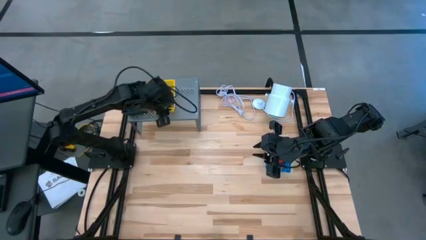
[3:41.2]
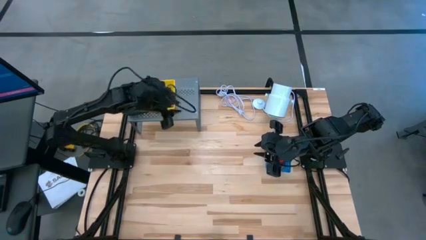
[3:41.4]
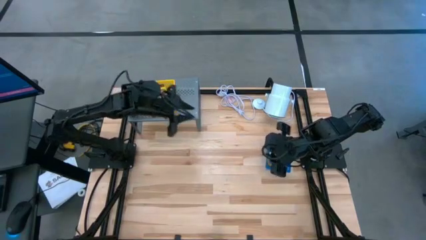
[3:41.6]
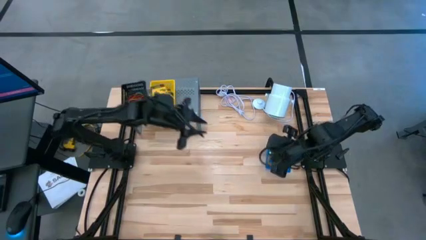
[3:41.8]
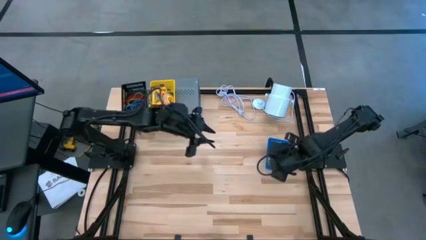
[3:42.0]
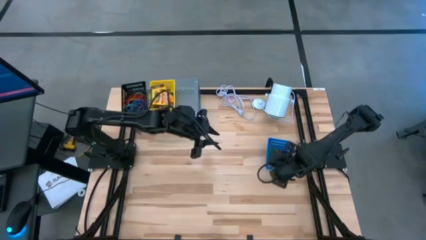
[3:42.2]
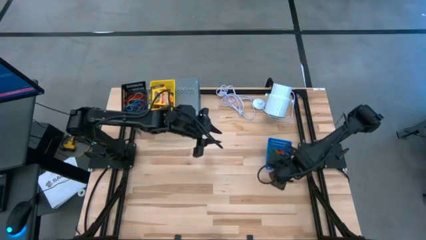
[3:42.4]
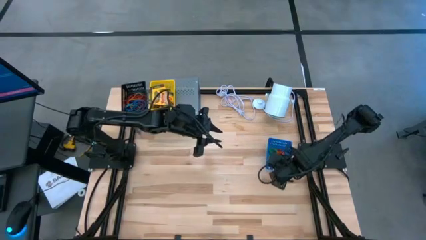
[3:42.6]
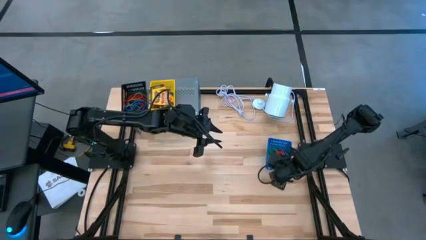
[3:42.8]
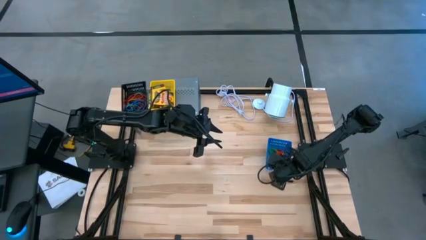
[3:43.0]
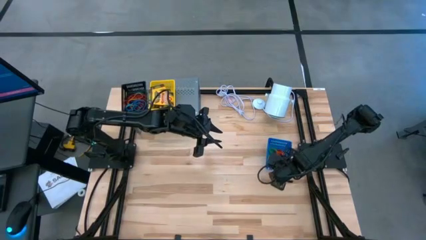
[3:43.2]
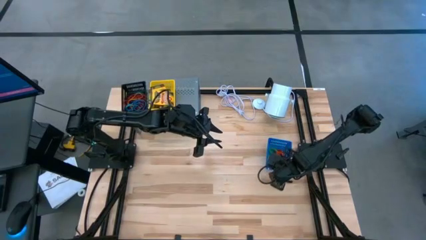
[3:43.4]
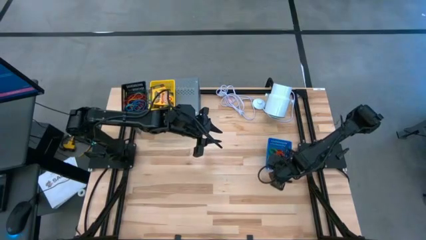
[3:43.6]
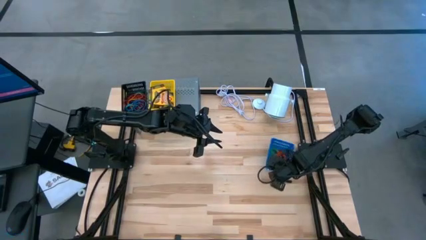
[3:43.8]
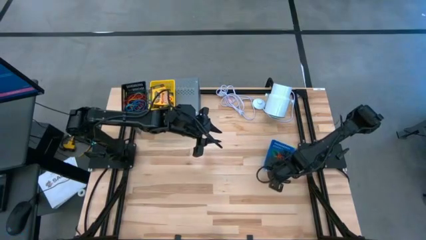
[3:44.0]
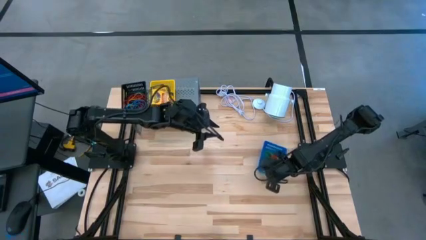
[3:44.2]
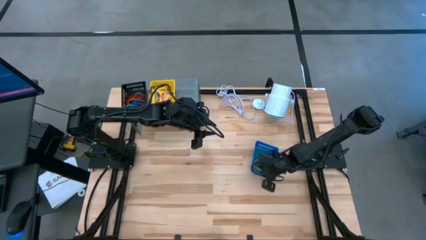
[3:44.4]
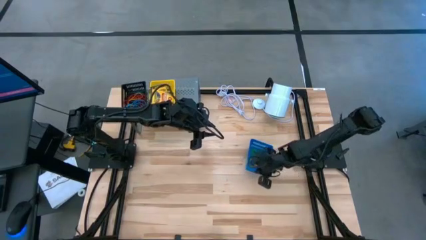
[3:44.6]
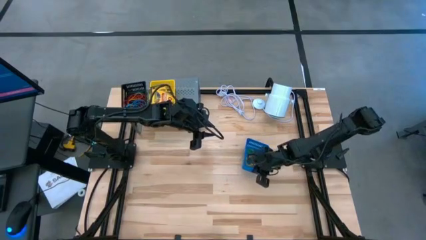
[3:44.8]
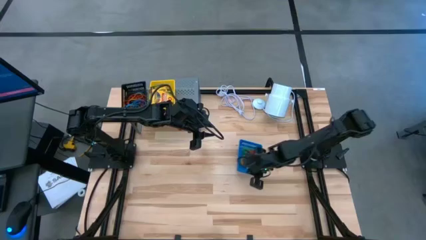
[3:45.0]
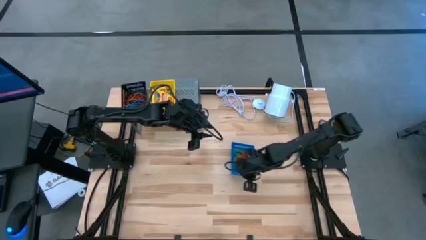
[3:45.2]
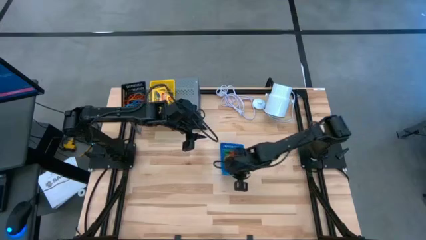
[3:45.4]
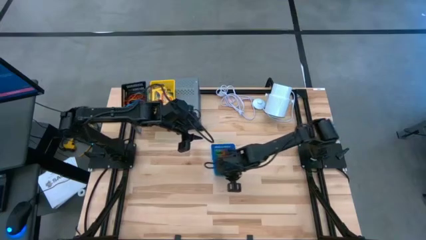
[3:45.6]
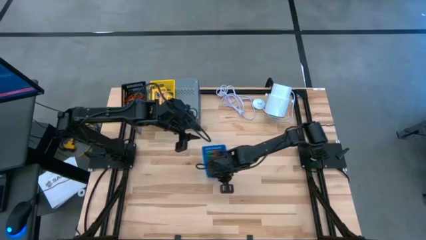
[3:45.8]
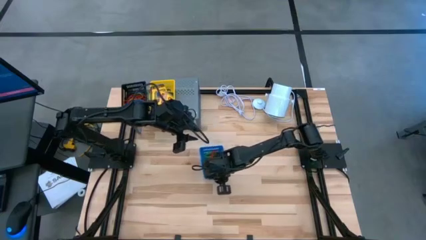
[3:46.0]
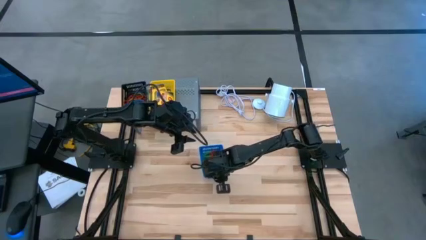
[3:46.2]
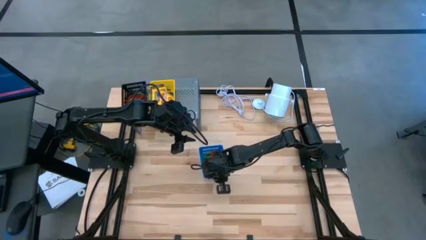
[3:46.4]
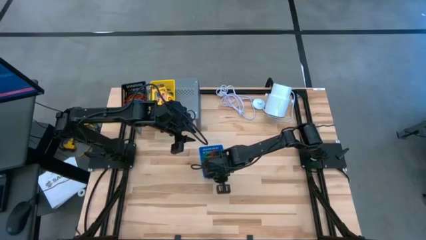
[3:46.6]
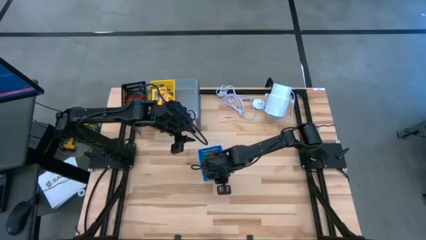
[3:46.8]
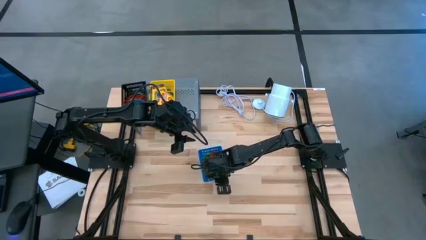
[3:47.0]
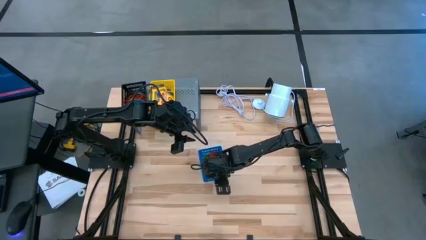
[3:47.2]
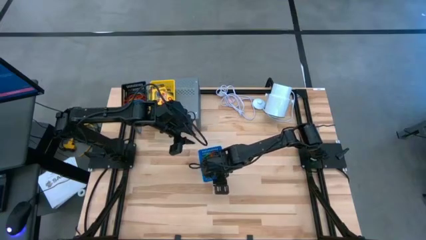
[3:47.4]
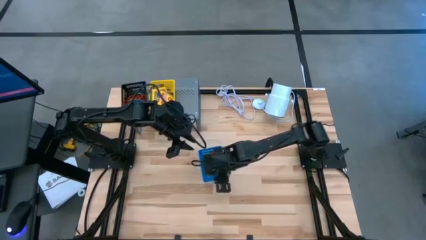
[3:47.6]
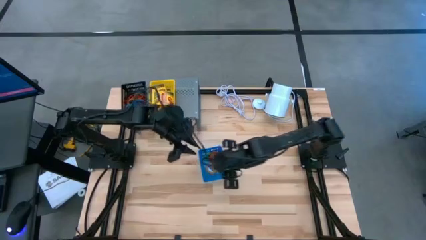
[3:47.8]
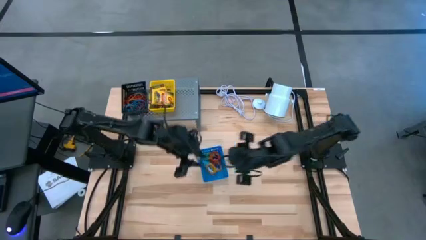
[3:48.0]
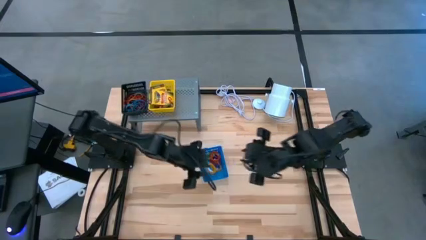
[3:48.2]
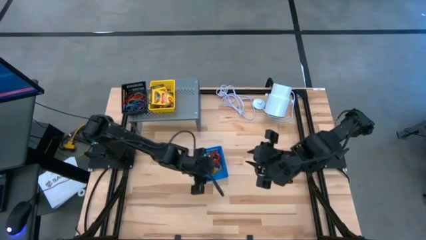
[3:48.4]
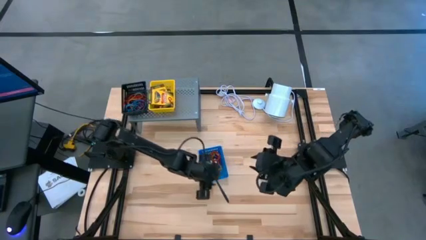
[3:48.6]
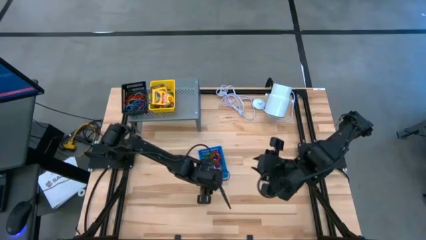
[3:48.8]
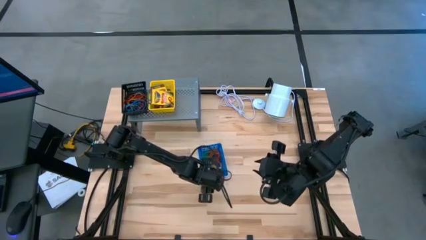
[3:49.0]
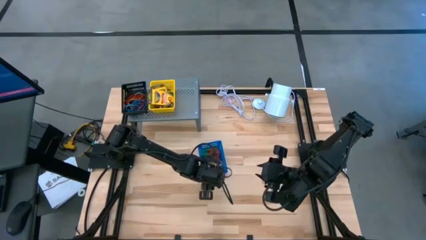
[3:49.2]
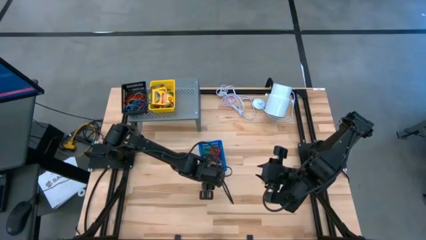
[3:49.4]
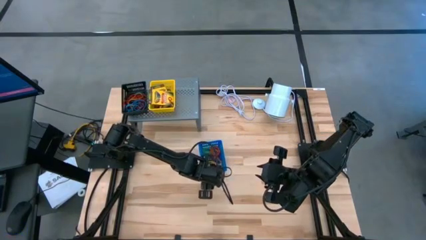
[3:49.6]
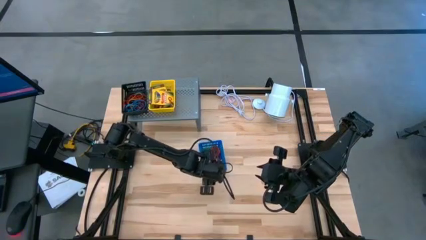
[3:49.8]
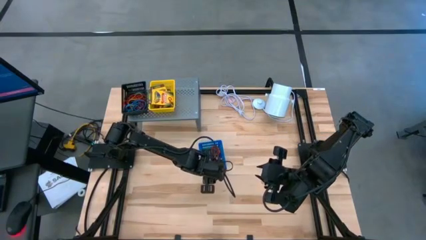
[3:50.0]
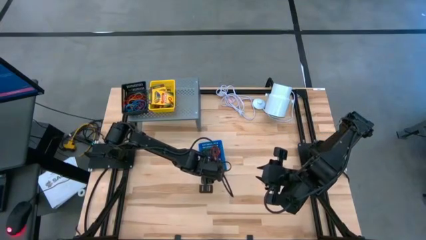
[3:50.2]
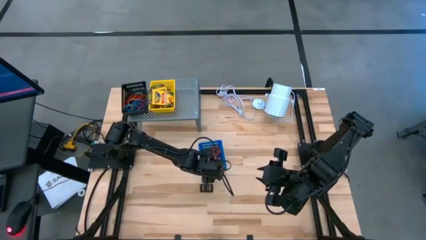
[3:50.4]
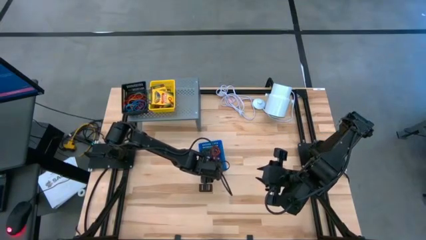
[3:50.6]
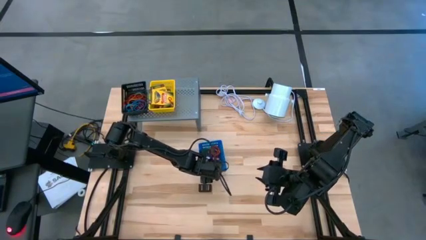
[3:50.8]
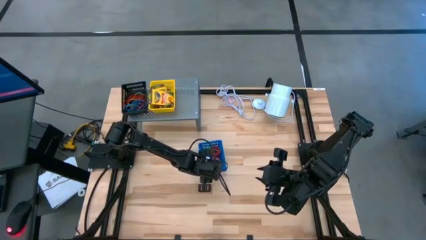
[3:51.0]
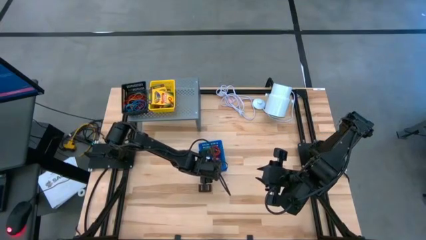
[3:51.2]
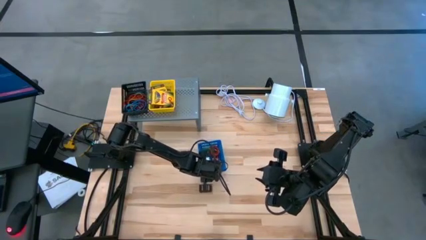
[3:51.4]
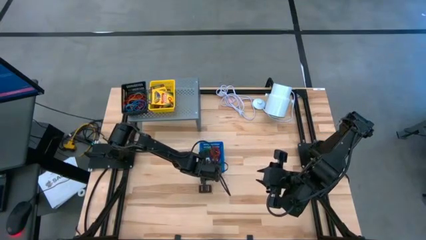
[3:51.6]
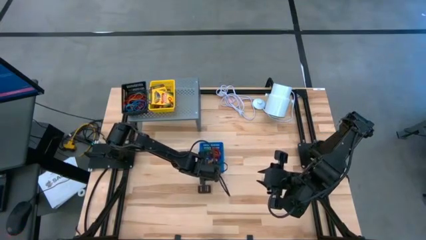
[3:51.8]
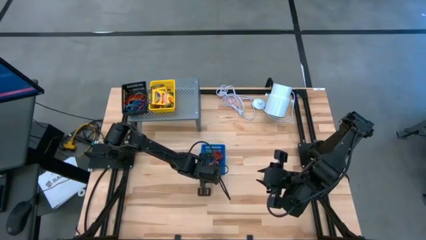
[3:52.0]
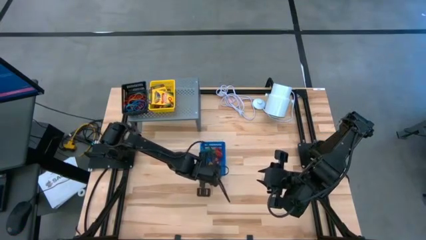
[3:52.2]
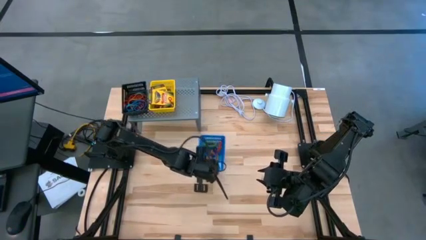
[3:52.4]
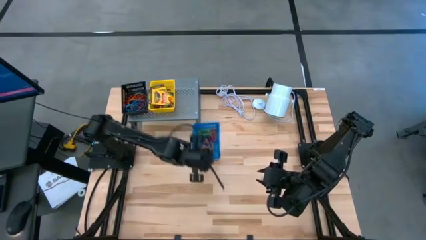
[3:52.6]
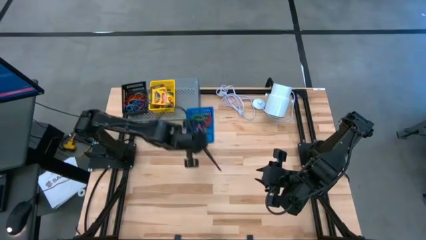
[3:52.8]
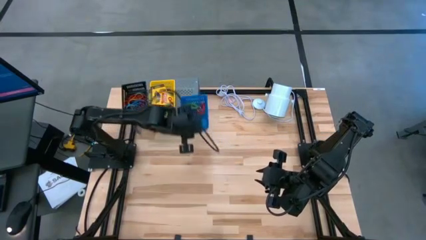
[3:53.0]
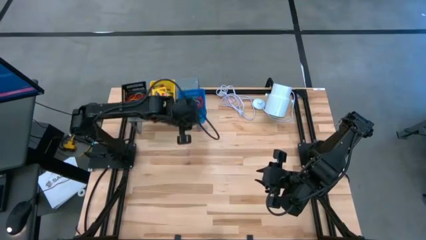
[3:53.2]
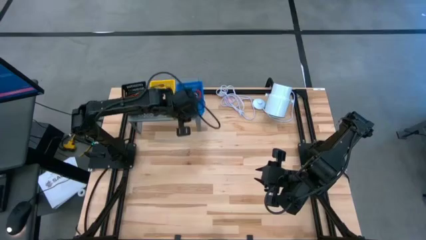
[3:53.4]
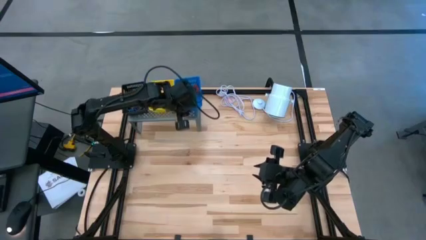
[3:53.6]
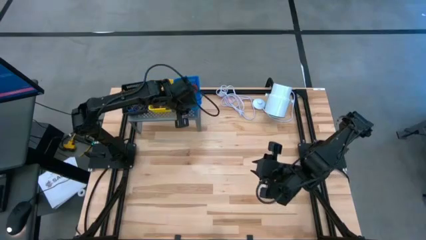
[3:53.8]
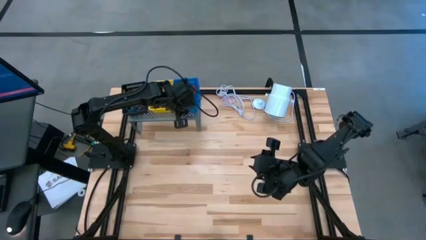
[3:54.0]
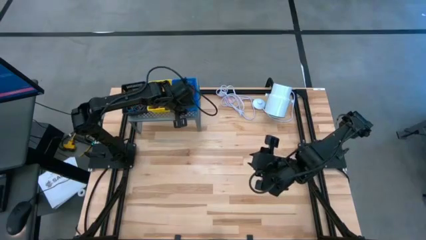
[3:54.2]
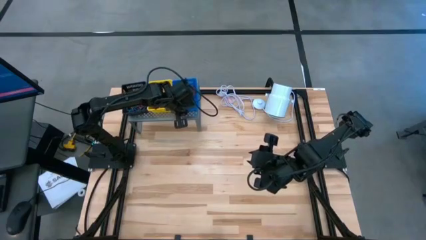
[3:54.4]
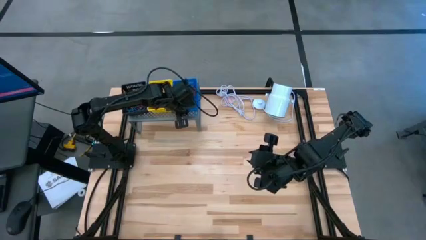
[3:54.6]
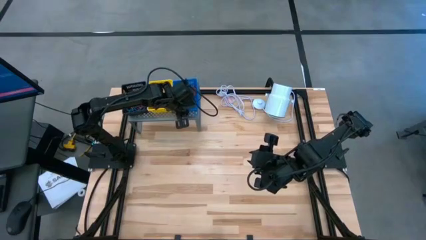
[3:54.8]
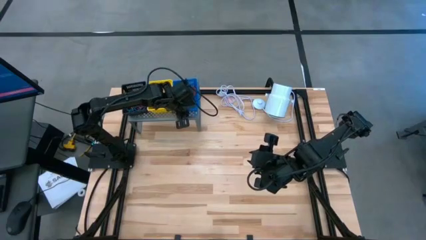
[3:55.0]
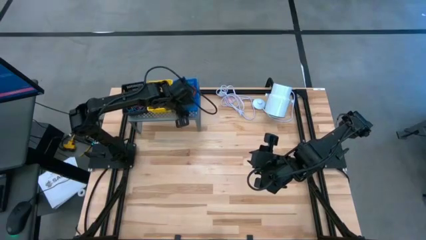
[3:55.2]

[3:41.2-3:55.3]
Task: Pick & Place Office Desk Supplies
Put the blue bin on the shelf
